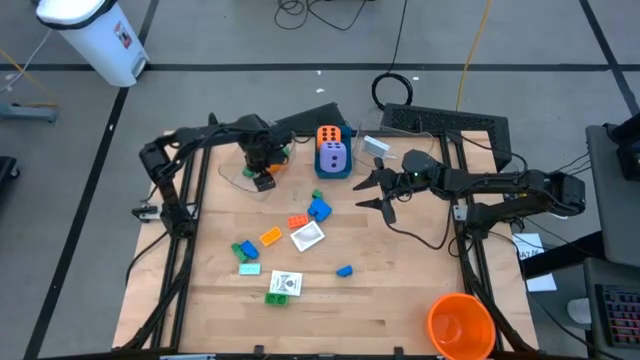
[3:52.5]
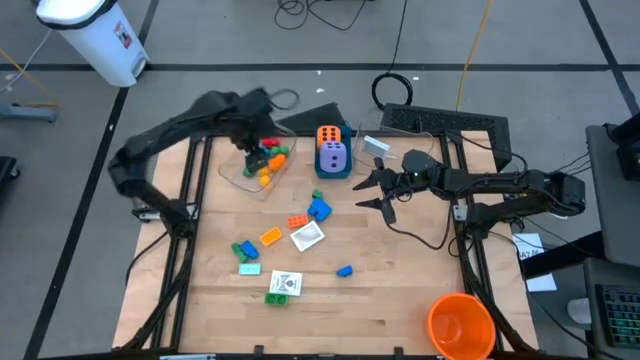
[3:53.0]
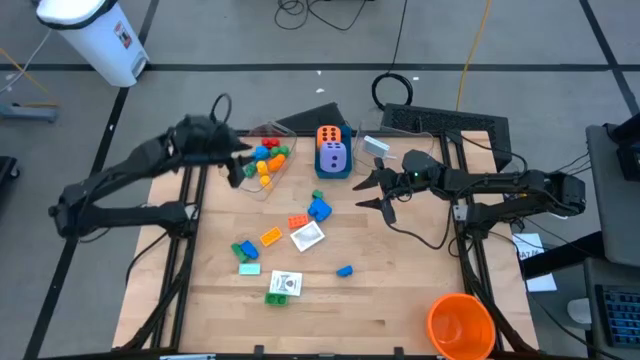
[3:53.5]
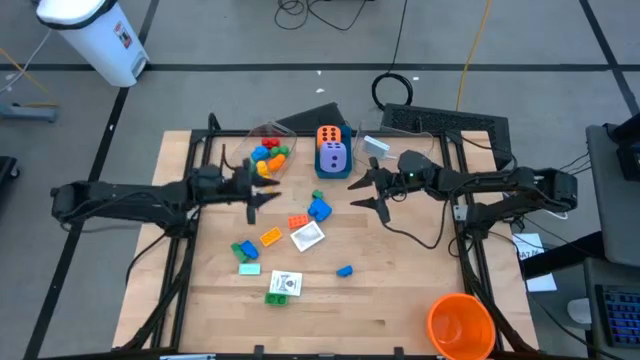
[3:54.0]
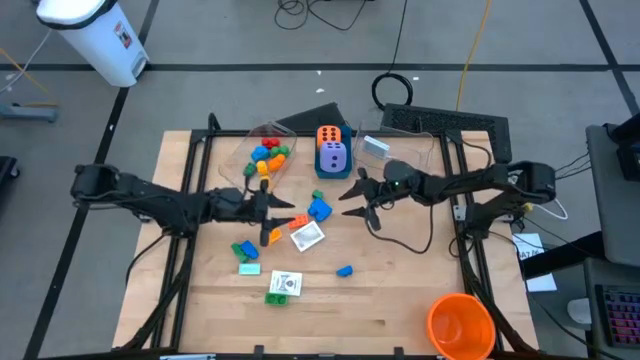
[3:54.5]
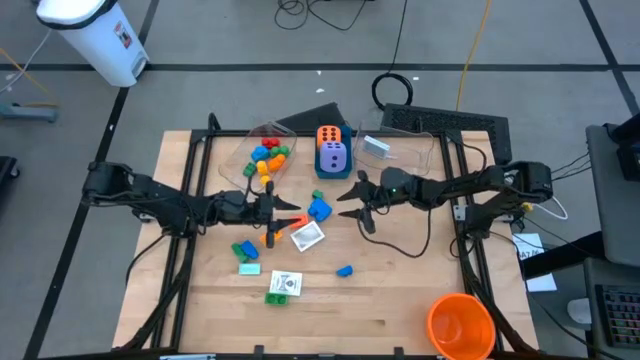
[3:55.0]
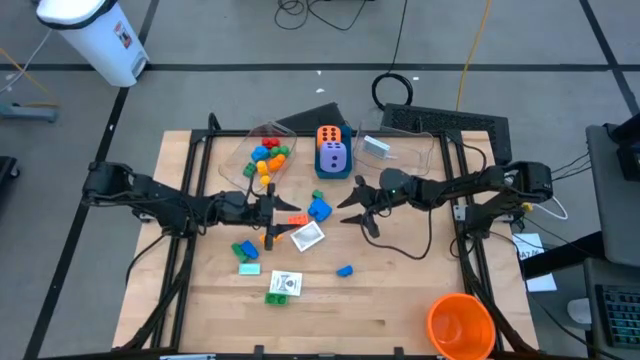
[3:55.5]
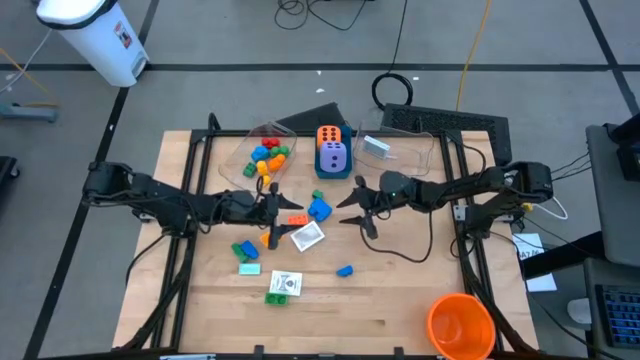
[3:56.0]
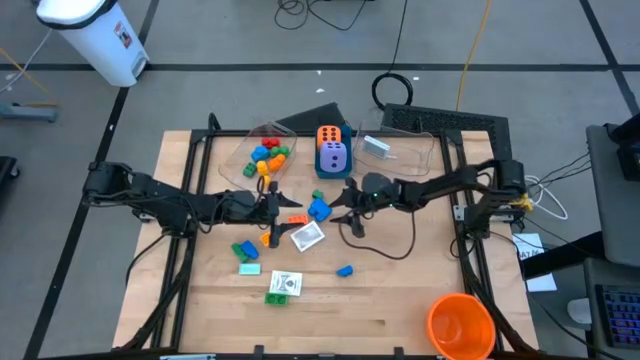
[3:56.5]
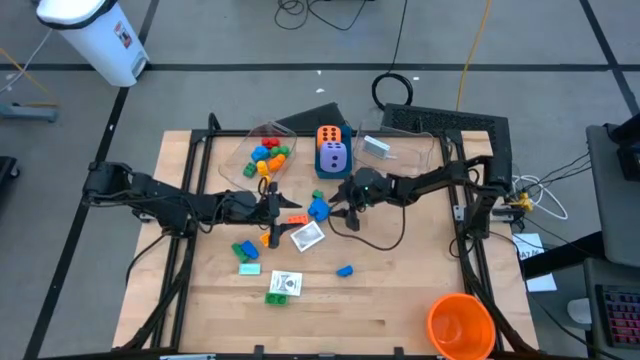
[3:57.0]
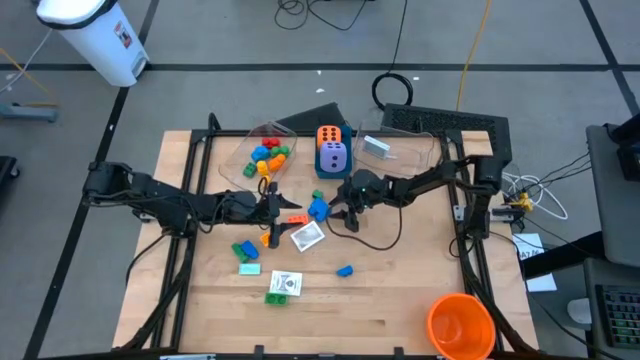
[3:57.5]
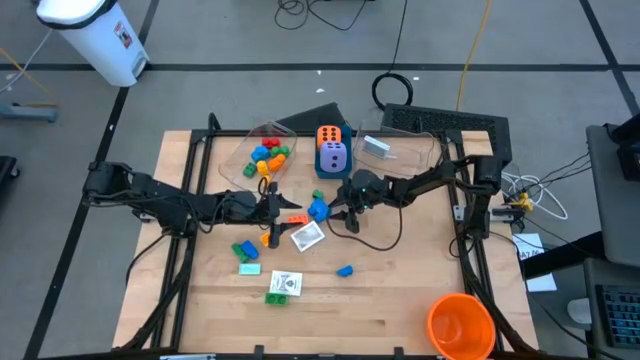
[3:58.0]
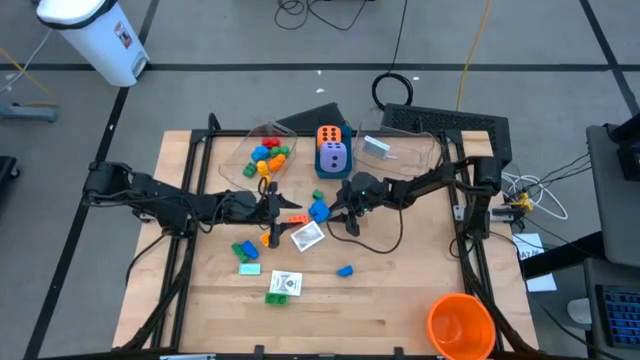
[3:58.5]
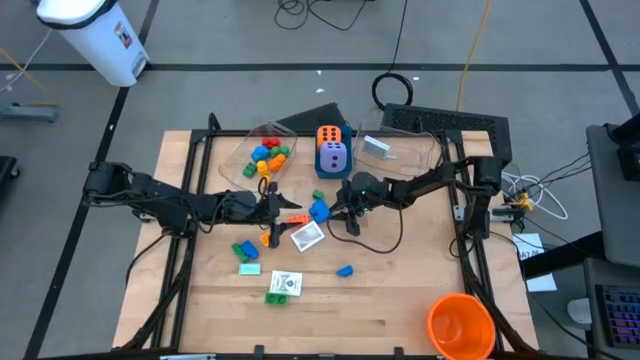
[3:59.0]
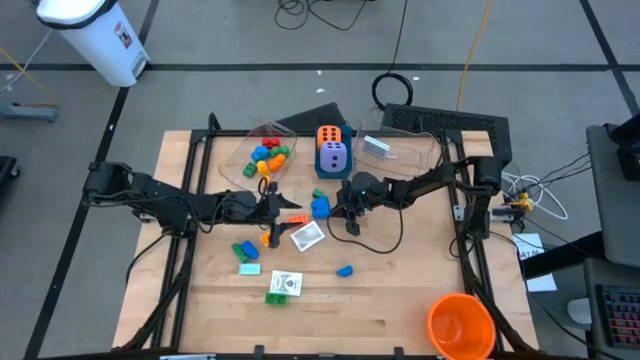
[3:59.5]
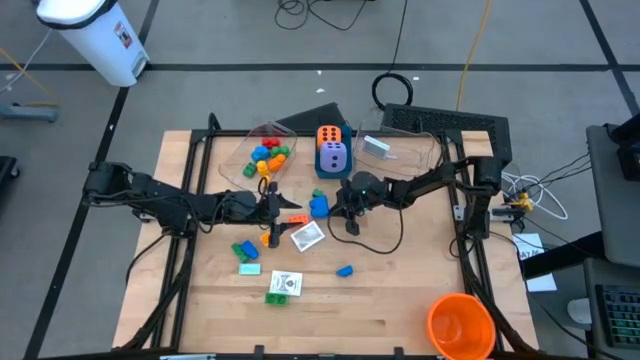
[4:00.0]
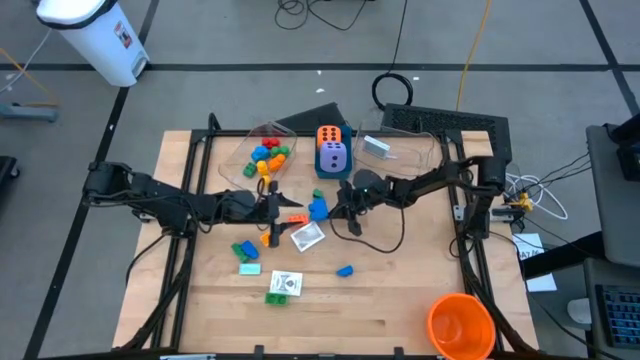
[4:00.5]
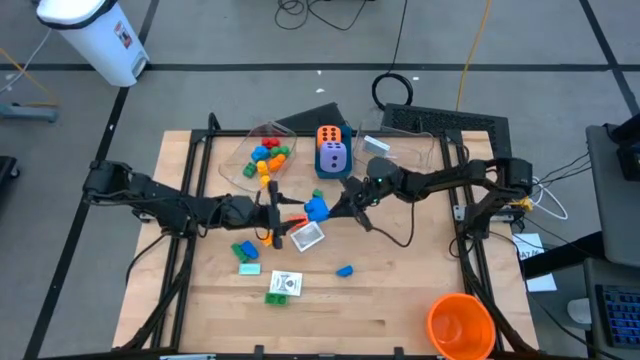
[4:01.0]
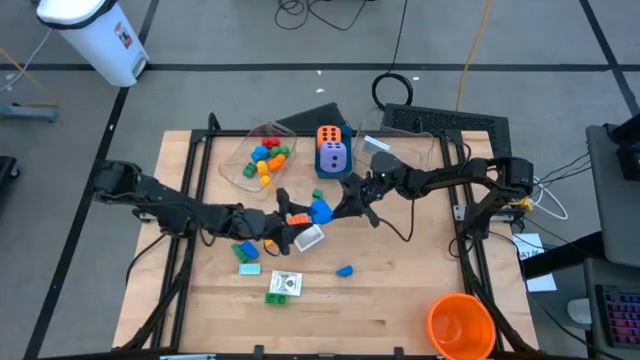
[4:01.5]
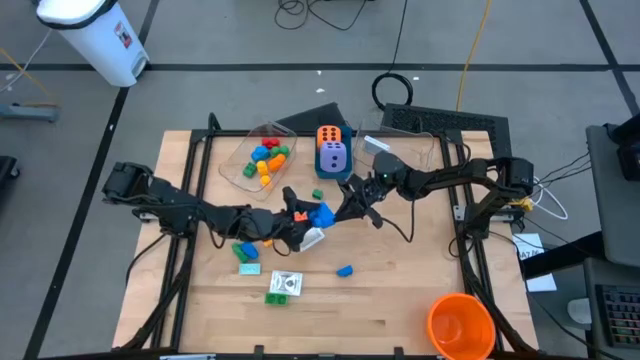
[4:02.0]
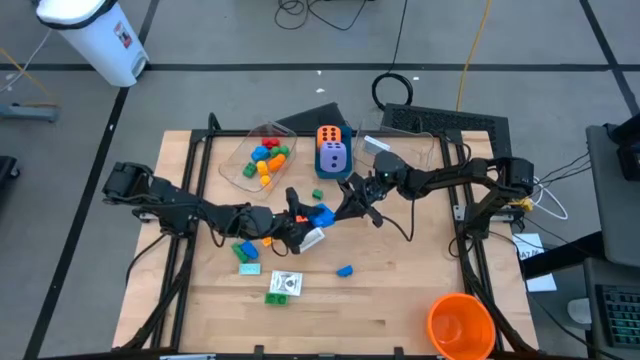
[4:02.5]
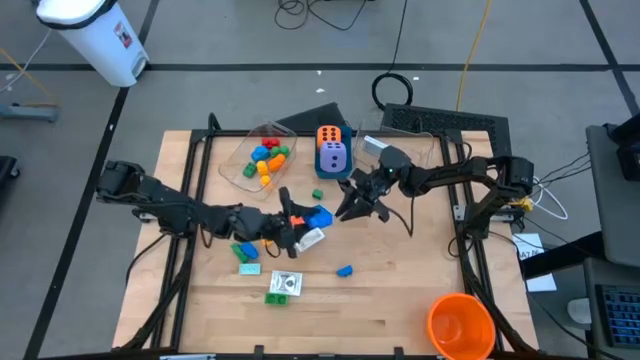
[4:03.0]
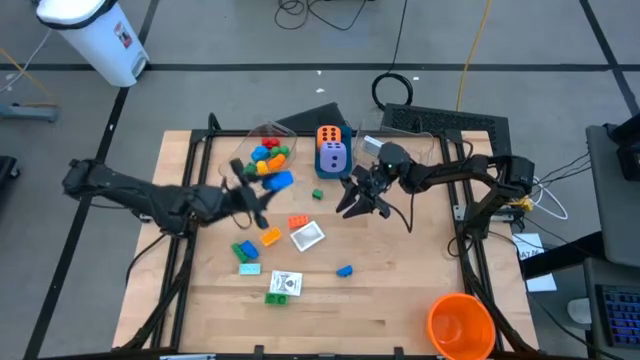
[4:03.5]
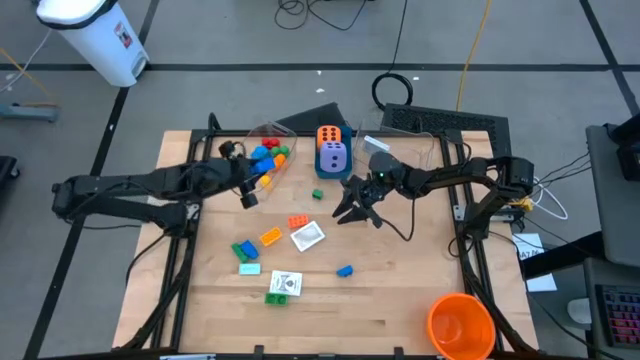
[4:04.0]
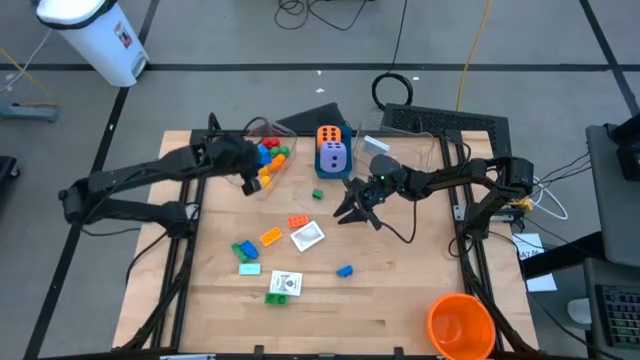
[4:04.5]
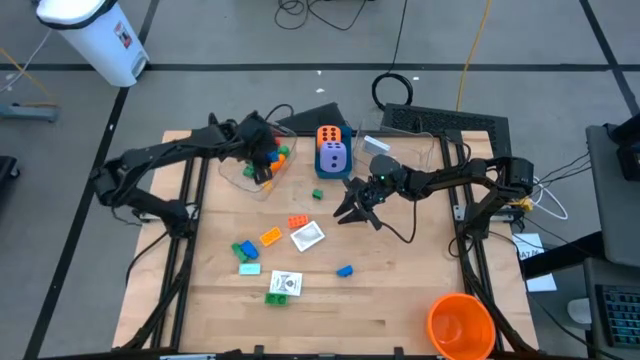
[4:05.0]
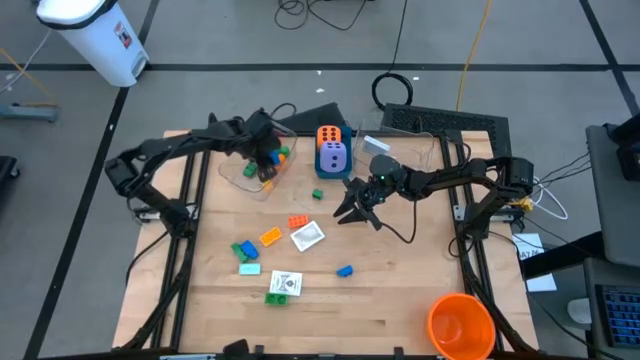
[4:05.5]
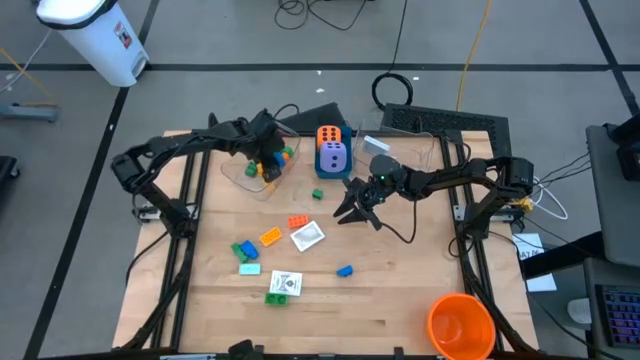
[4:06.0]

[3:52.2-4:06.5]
Task: Pick & Place Toys
Put the blue game piece into the left transparent bin

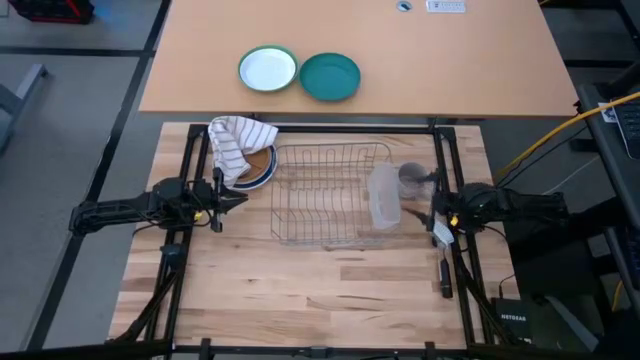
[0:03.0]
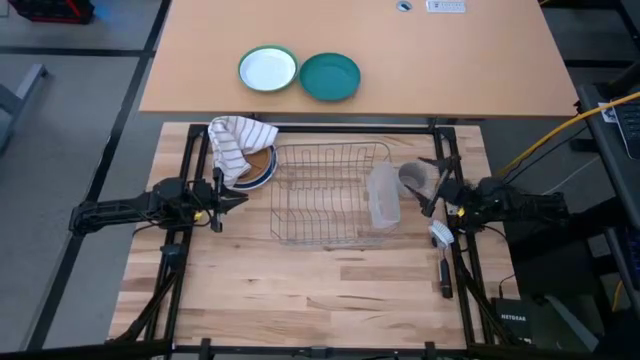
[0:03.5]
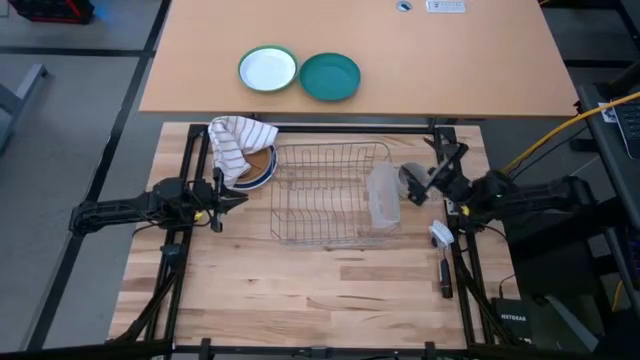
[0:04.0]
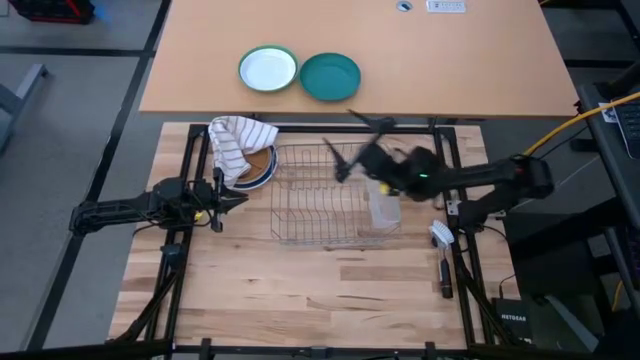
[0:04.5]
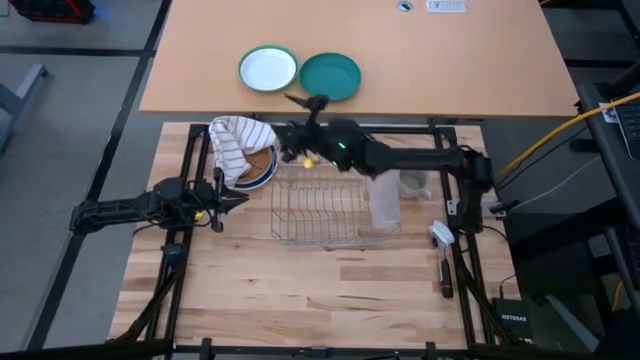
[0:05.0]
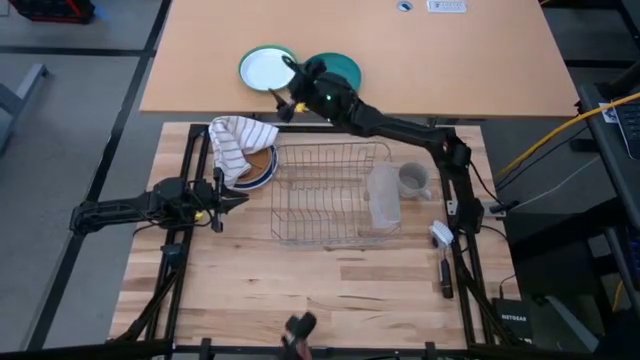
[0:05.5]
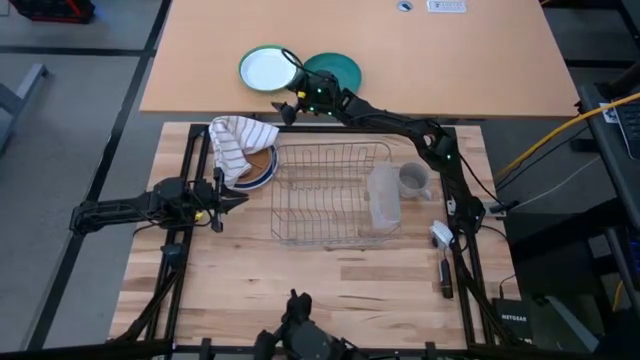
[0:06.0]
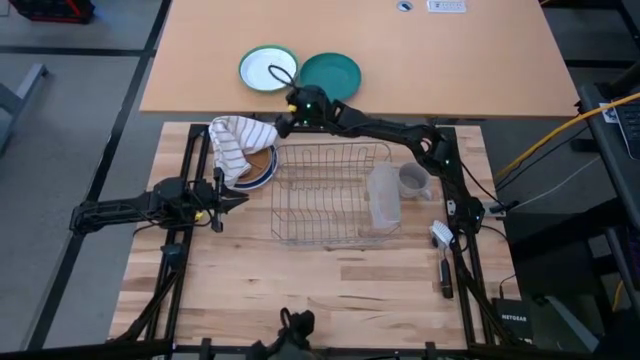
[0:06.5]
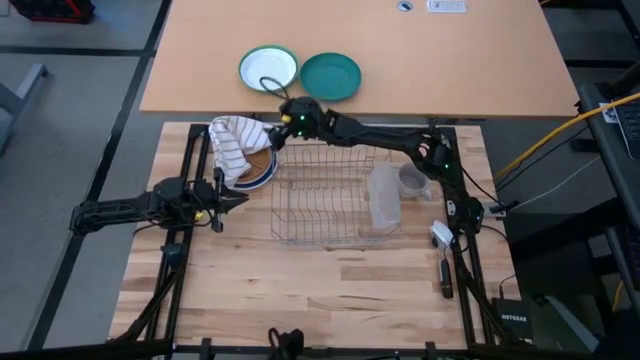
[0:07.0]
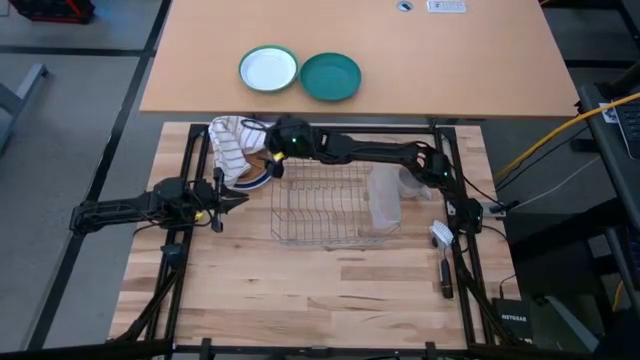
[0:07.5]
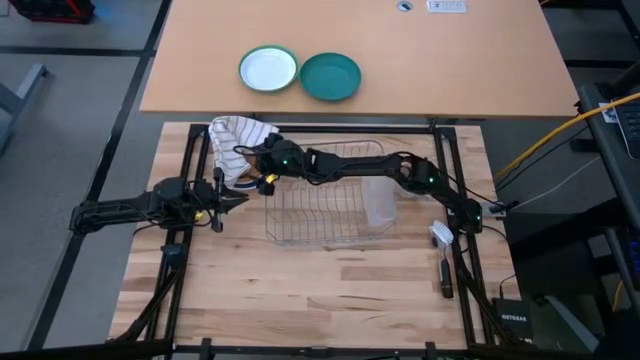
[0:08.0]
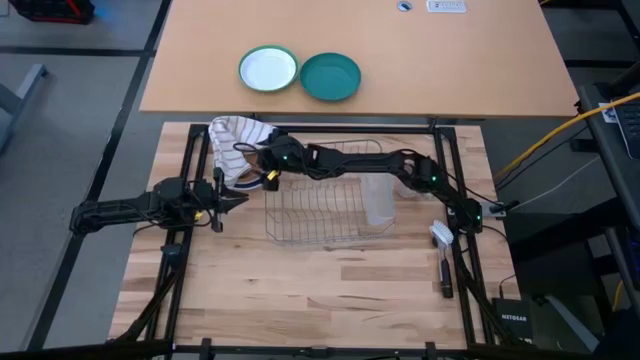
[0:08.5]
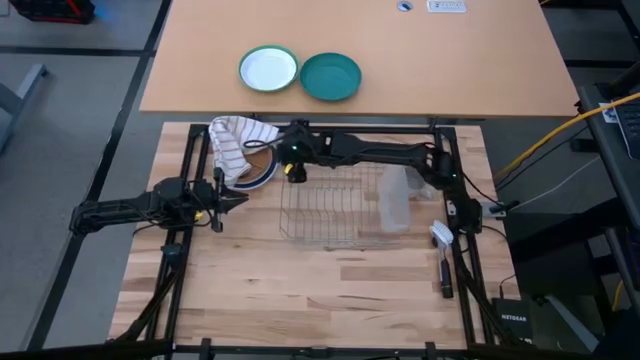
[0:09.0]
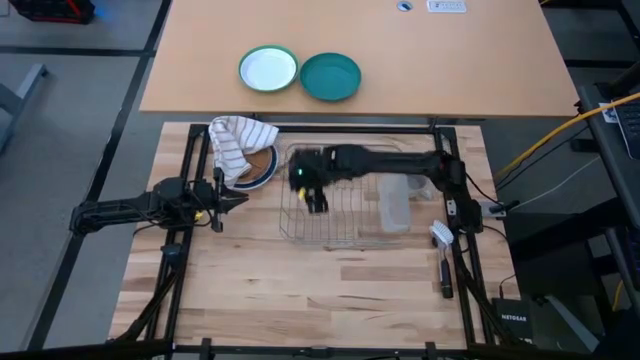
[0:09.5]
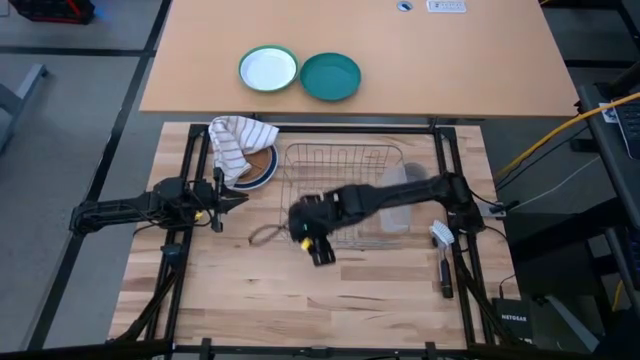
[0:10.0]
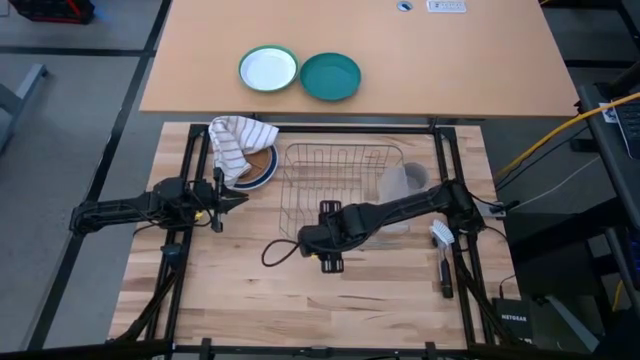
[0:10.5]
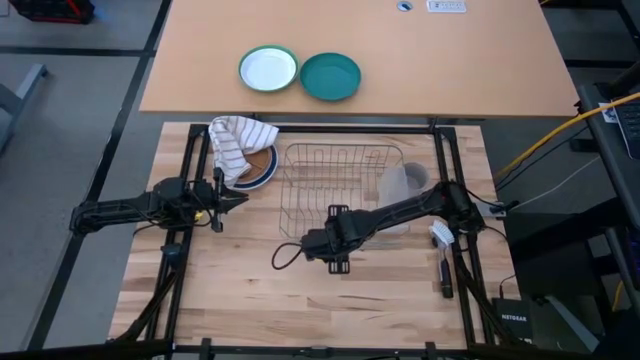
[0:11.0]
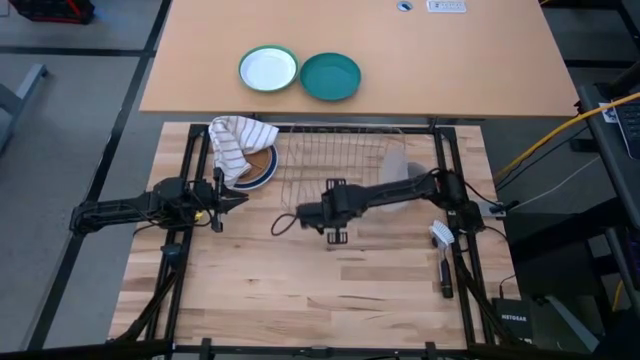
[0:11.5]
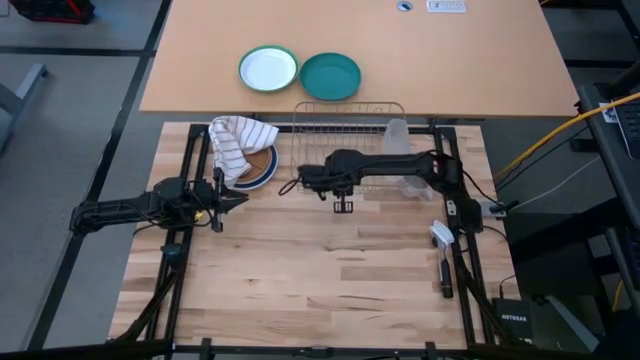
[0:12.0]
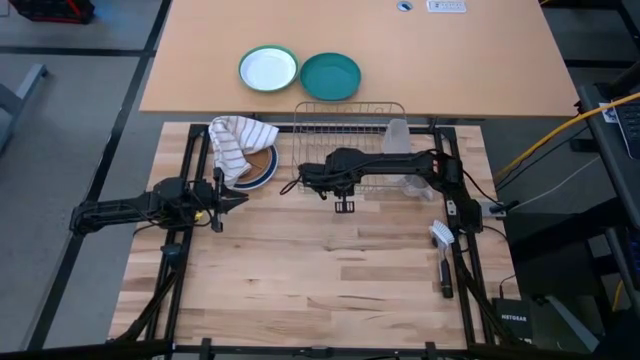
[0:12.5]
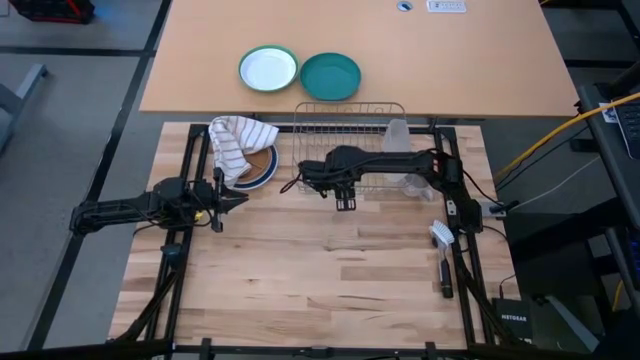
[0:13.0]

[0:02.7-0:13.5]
Task: Sort dishes
Prepare the dish rack
